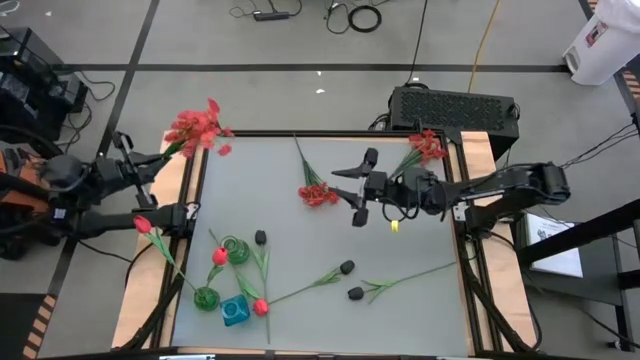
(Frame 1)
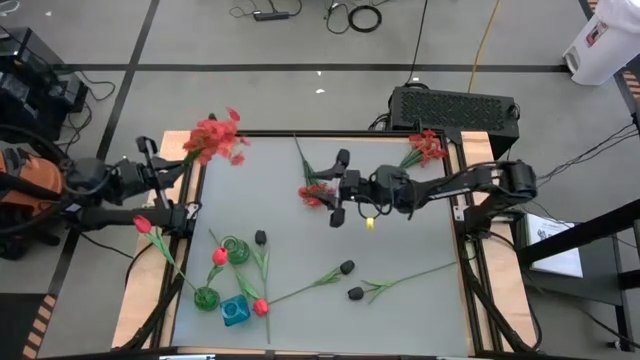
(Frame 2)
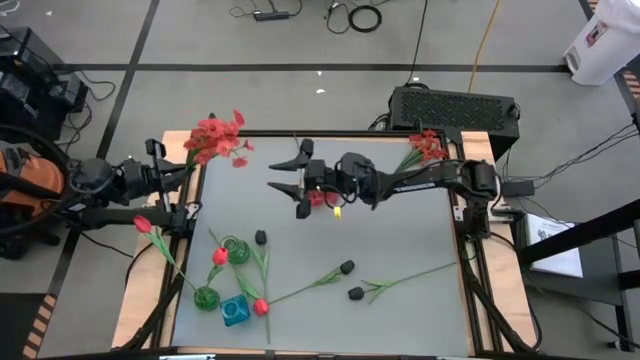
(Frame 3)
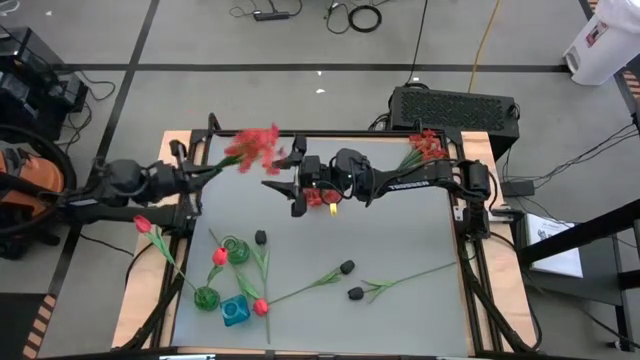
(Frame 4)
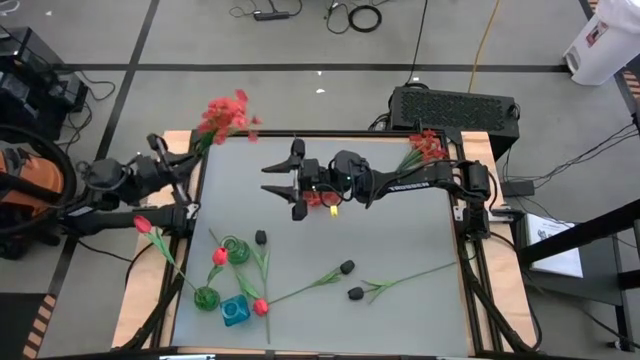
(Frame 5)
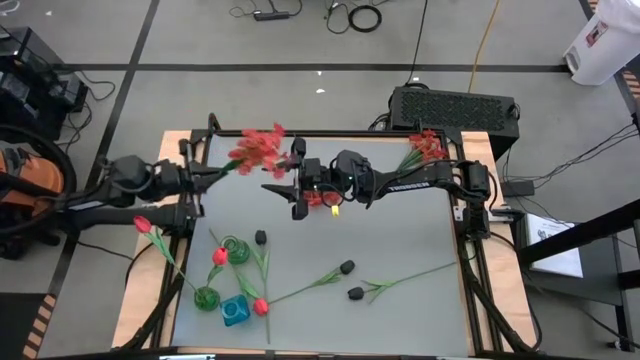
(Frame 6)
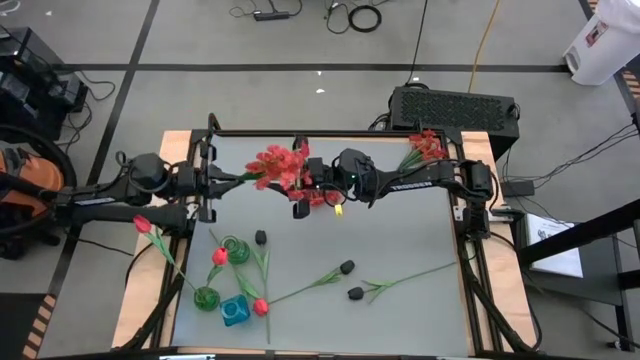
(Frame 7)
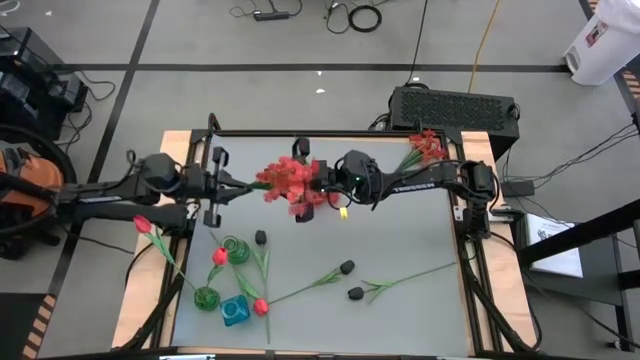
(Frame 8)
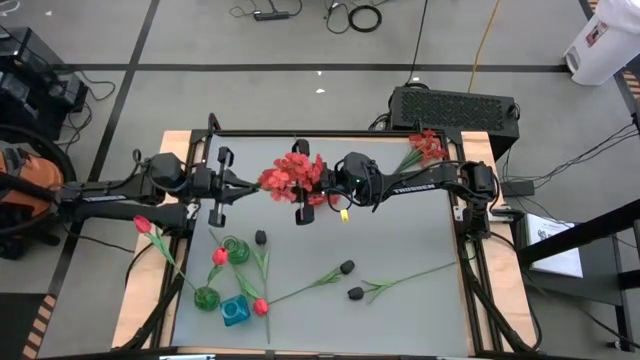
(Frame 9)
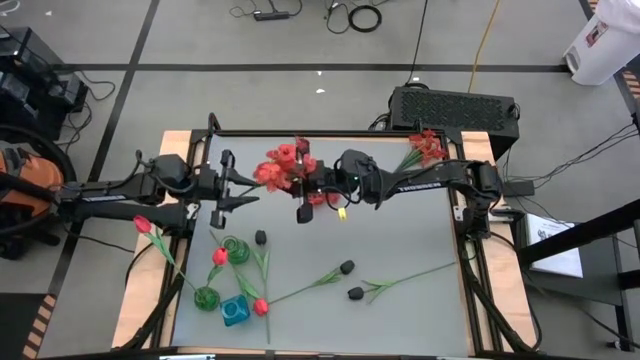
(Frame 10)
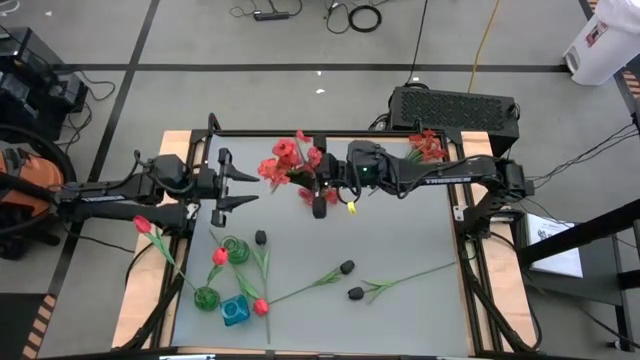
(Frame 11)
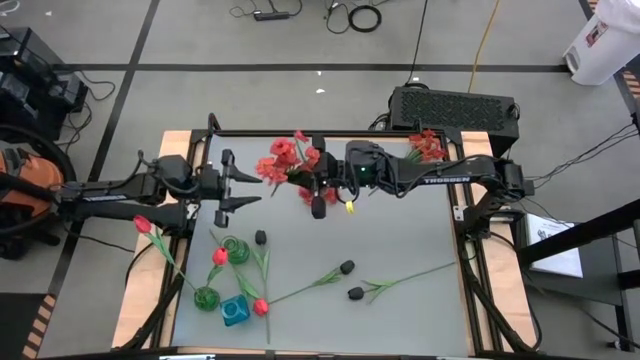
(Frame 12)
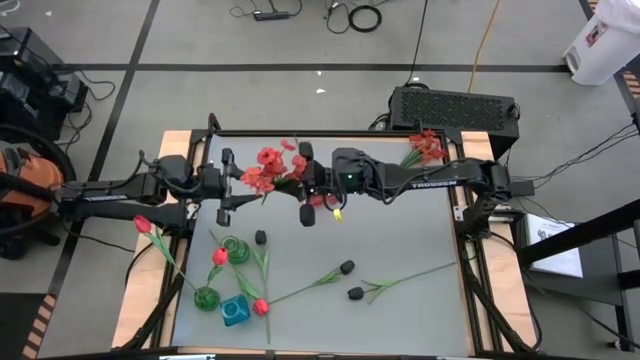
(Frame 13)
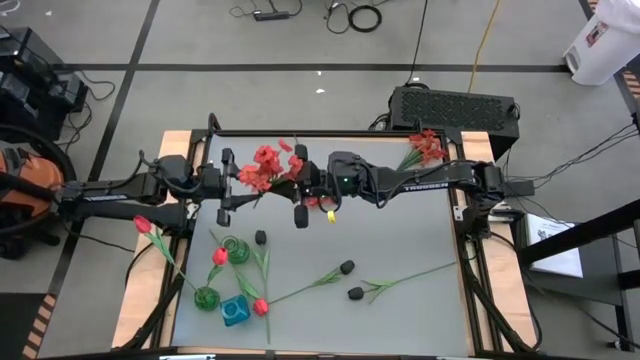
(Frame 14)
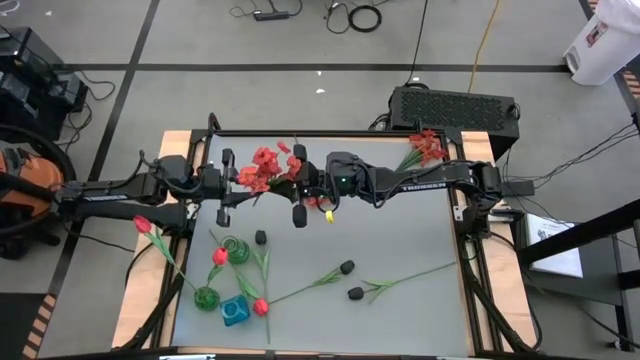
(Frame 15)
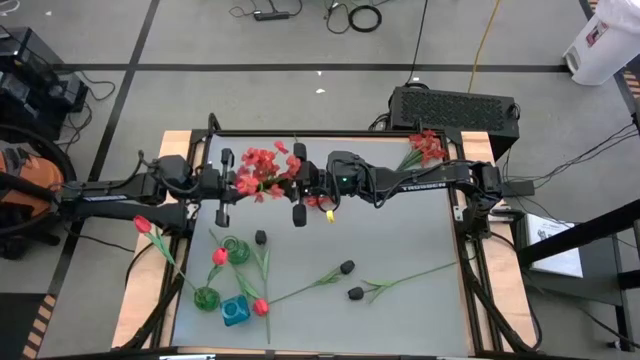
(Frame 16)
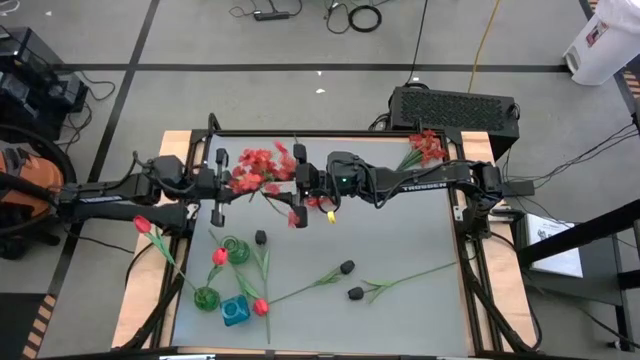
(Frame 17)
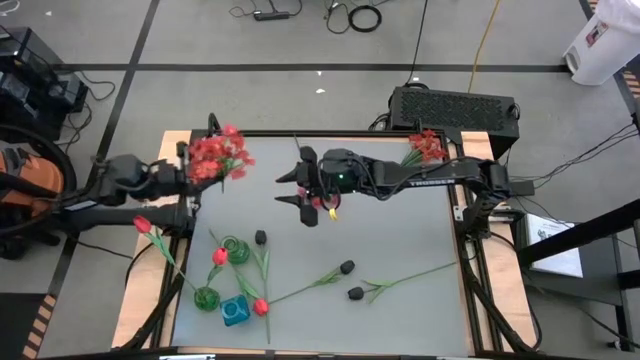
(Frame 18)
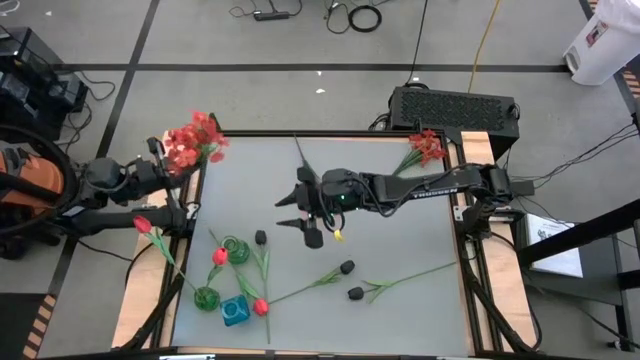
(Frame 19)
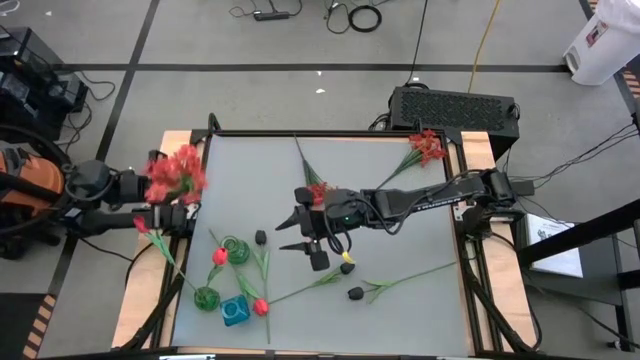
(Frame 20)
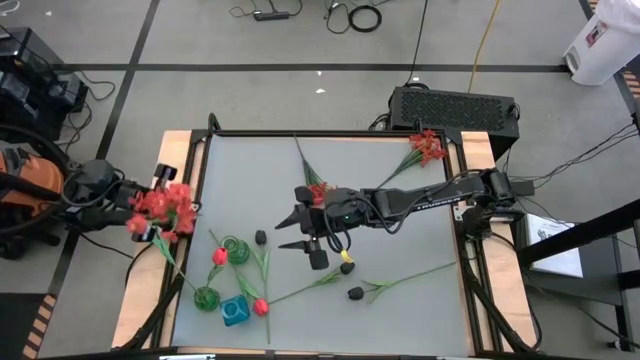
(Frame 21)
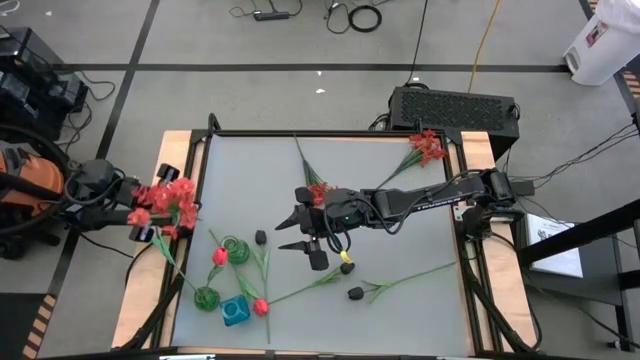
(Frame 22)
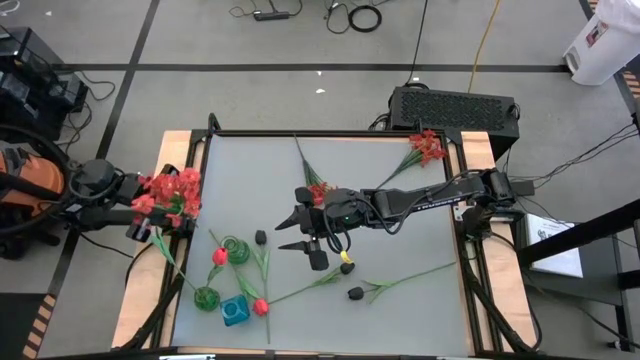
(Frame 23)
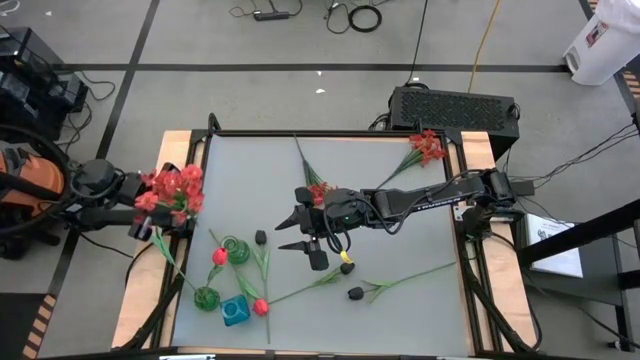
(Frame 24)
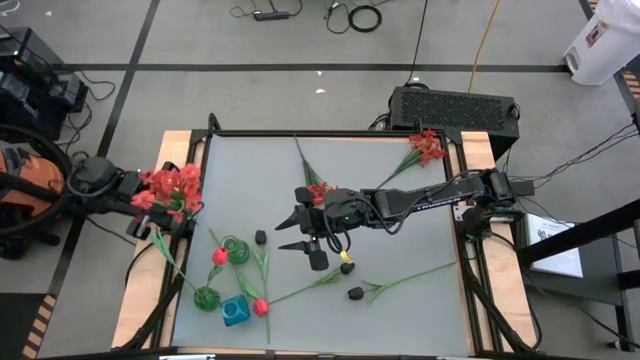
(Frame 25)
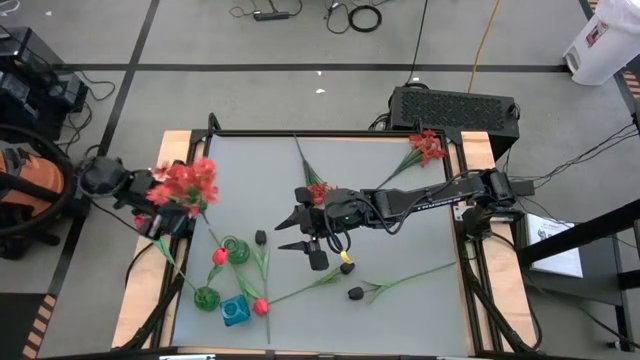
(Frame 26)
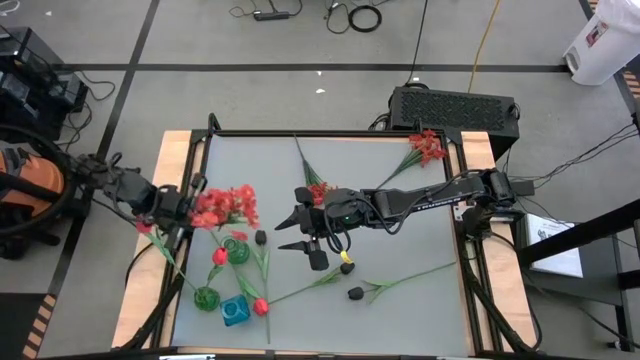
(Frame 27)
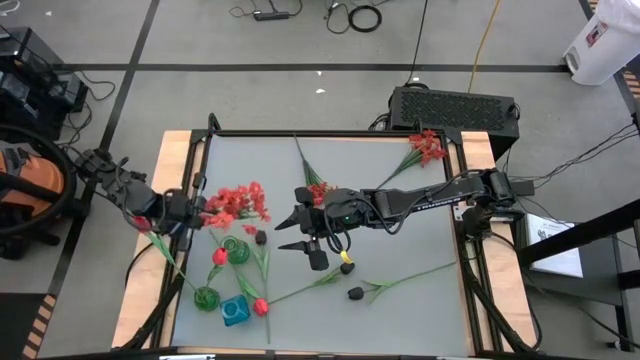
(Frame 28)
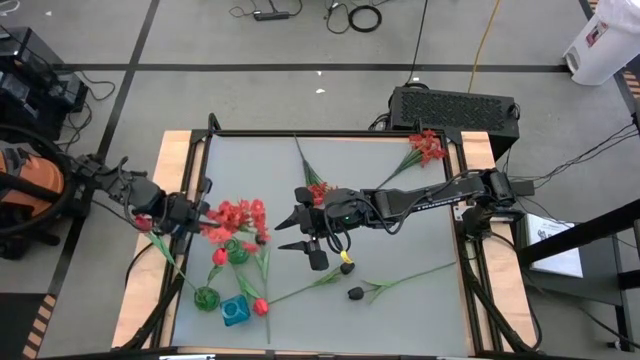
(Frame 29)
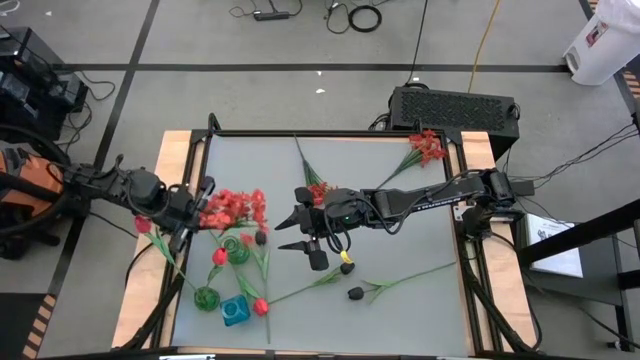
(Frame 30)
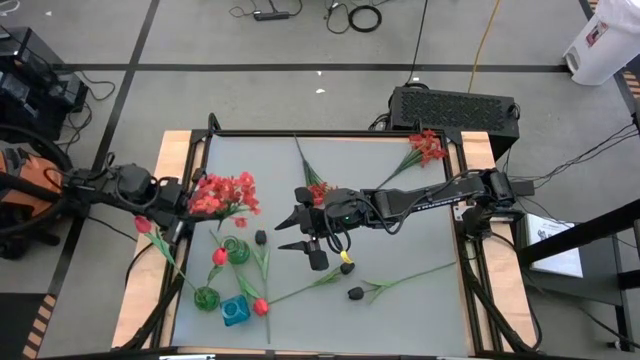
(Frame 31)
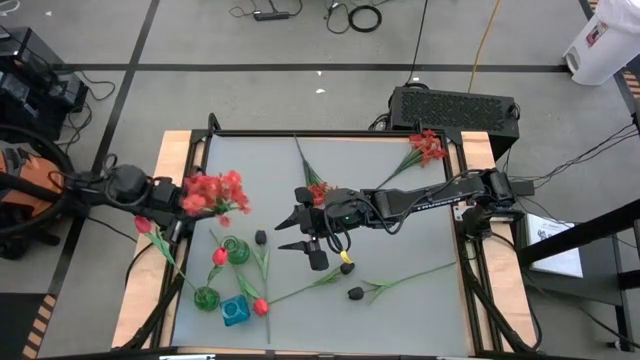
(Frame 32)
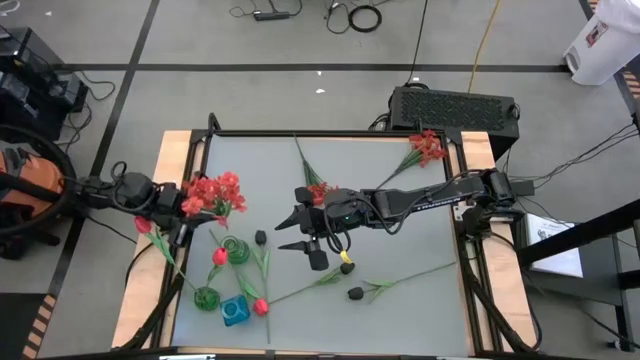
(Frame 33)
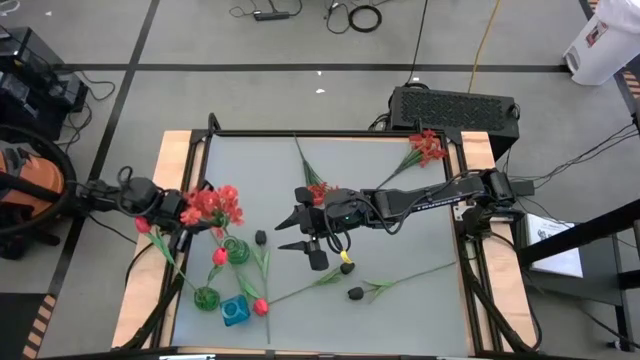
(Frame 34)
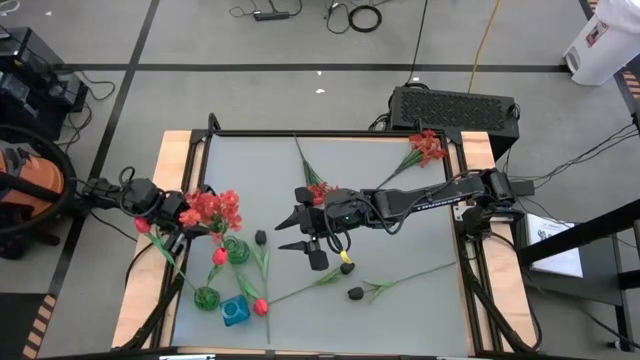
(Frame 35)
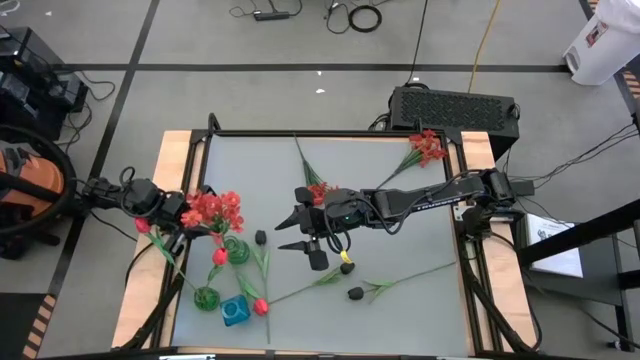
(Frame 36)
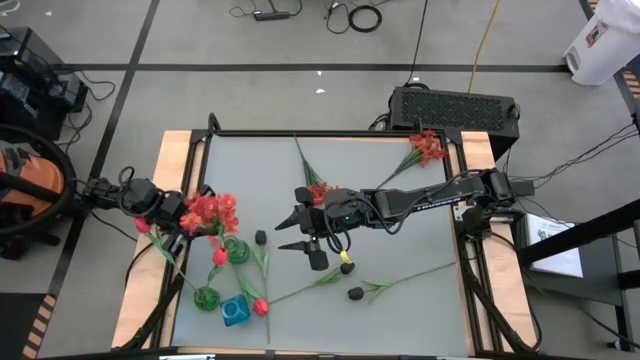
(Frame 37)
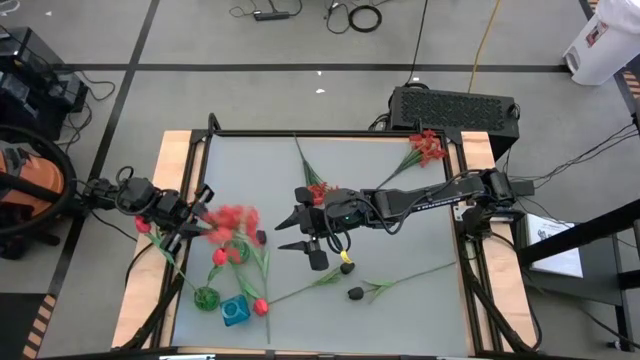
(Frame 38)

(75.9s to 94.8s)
Task: Sort flowers into vase by color
Put the bottom orange flowers into the top green vase

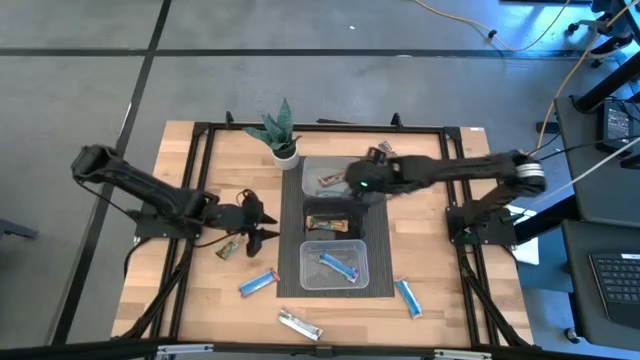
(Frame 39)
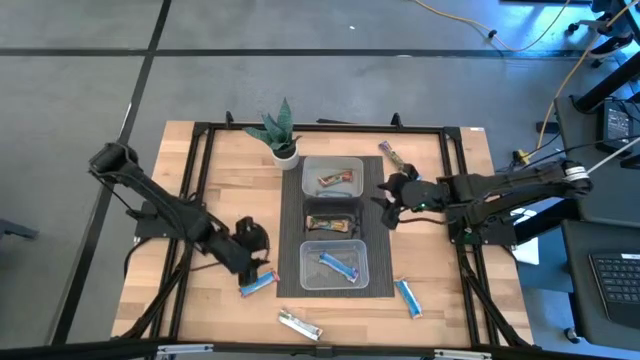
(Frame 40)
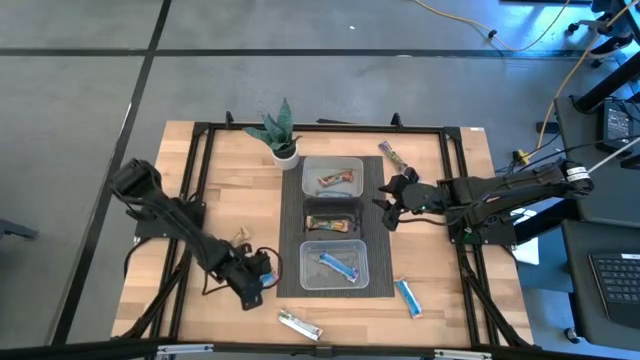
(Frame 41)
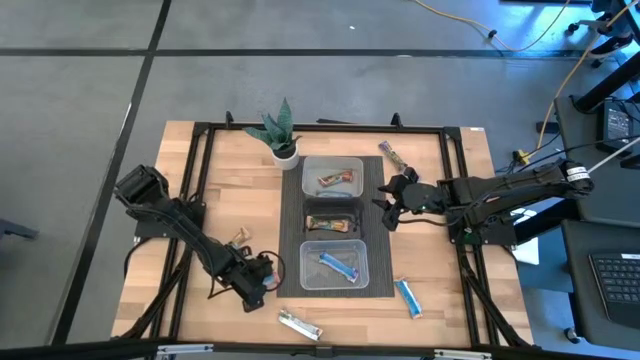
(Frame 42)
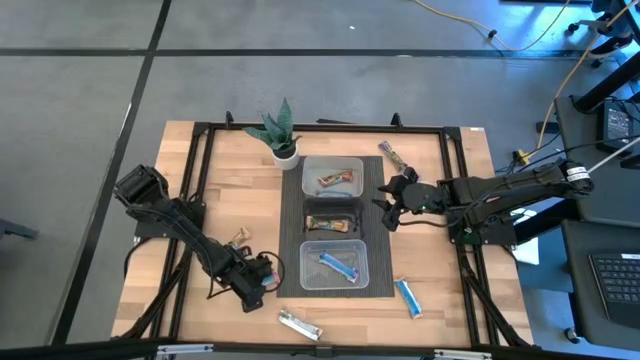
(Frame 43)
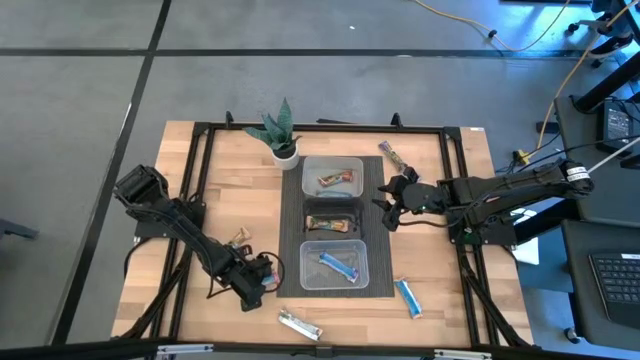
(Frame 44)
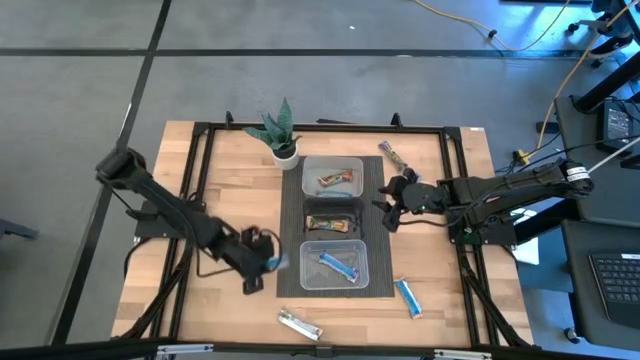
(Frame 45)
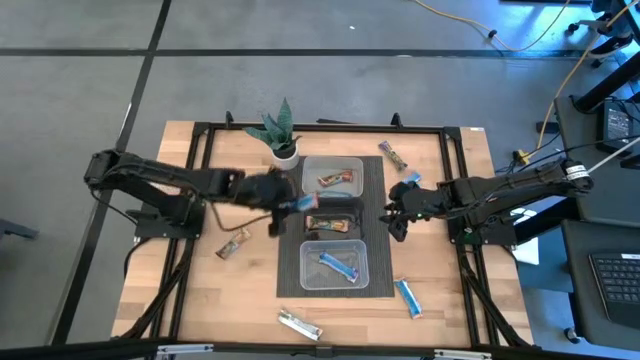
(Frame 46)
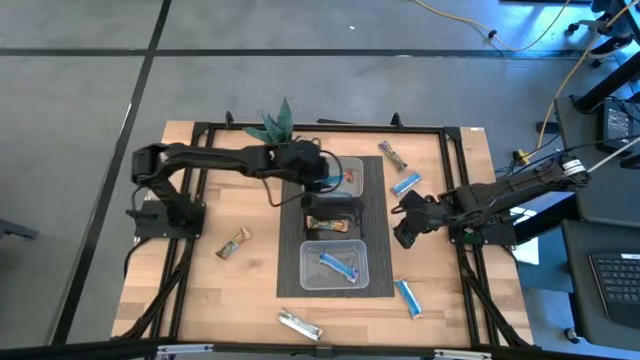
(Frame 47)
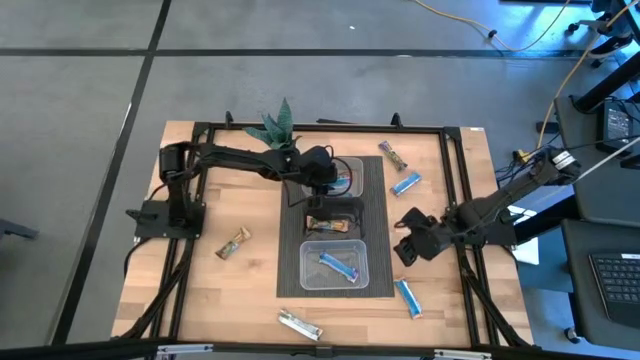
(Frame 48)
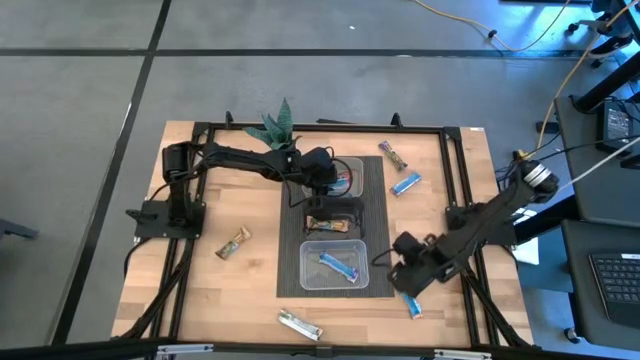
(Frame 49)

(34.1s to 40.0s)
Task: Pick and place Granola Bars by type
Put the red granola bar into the gray bin
